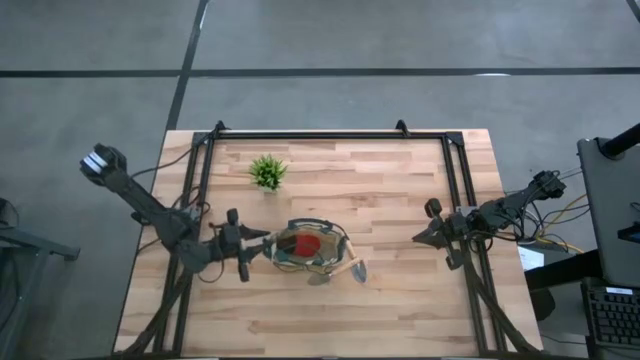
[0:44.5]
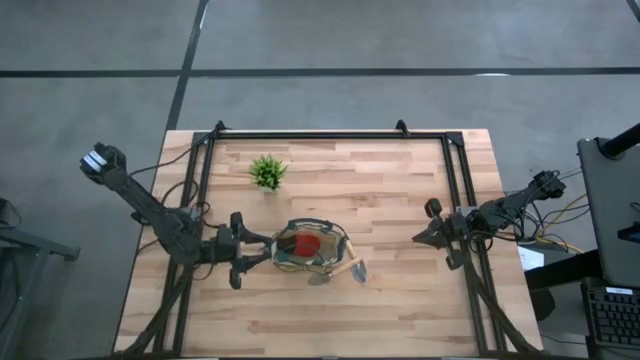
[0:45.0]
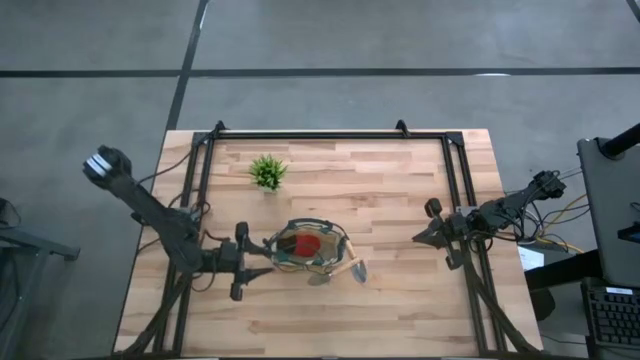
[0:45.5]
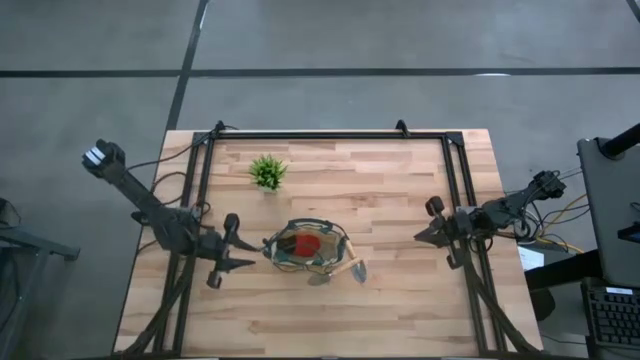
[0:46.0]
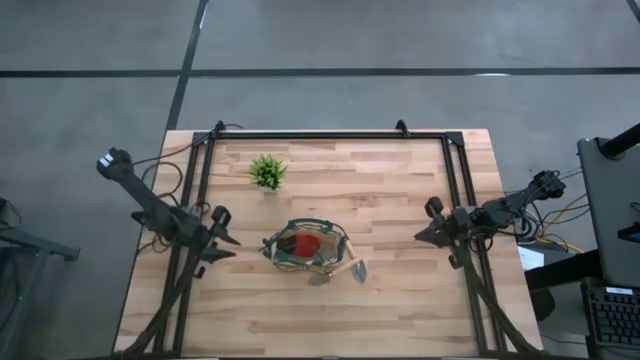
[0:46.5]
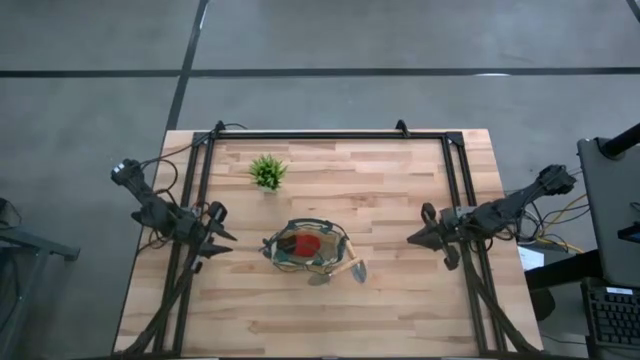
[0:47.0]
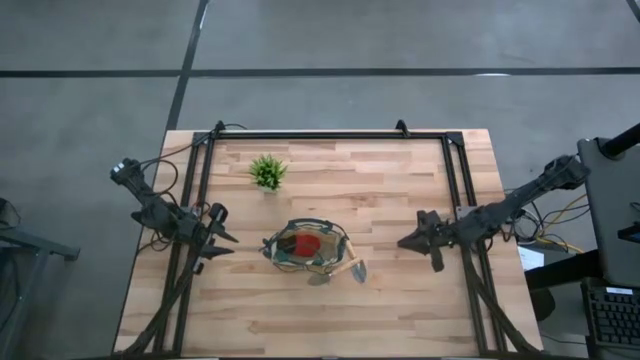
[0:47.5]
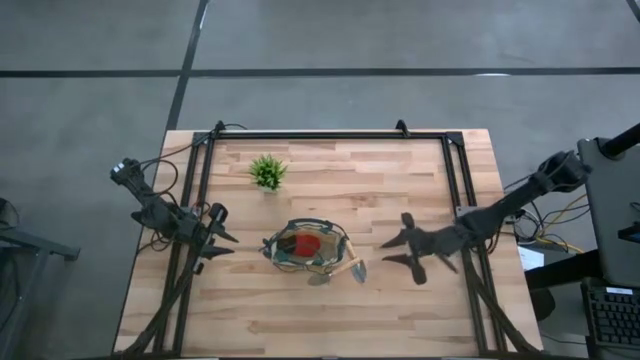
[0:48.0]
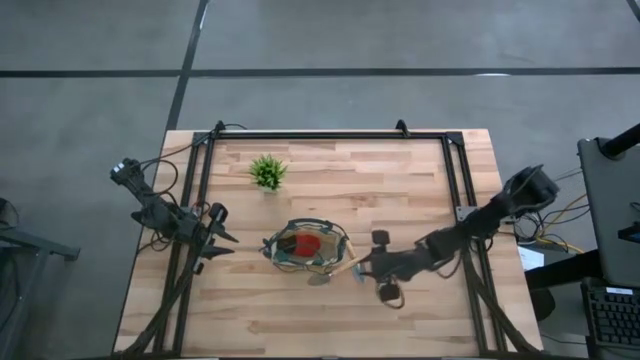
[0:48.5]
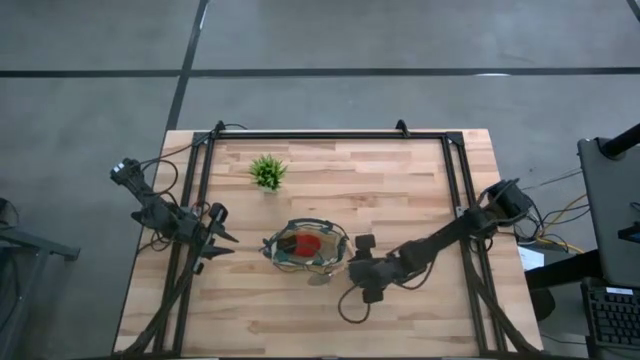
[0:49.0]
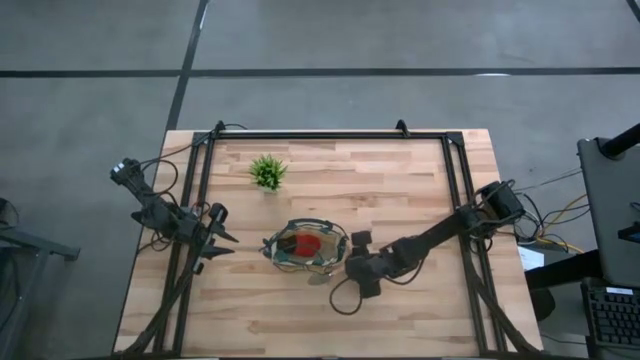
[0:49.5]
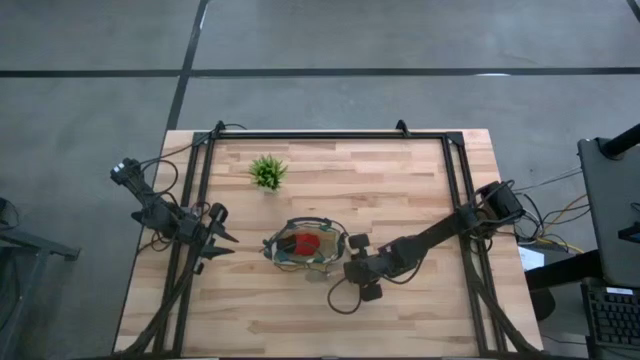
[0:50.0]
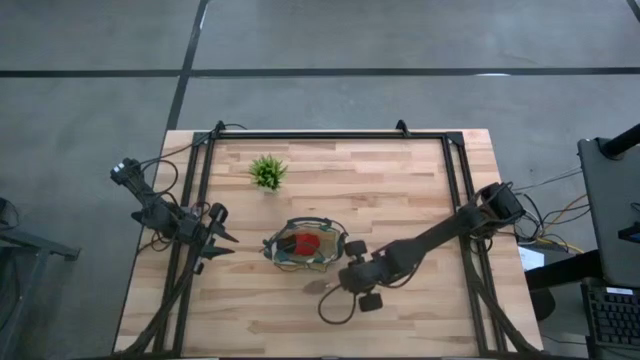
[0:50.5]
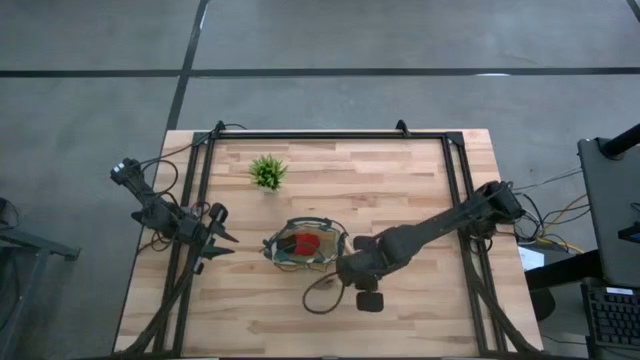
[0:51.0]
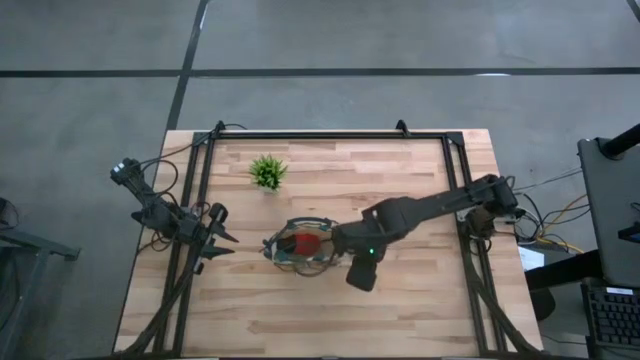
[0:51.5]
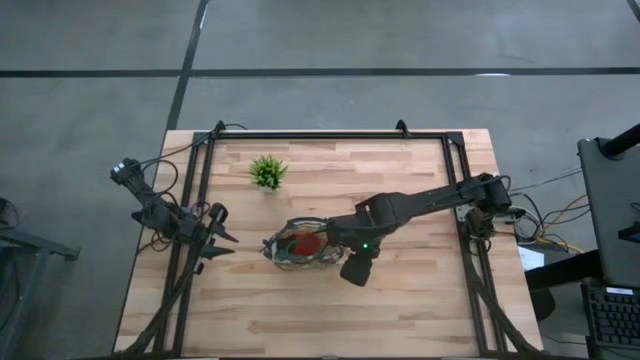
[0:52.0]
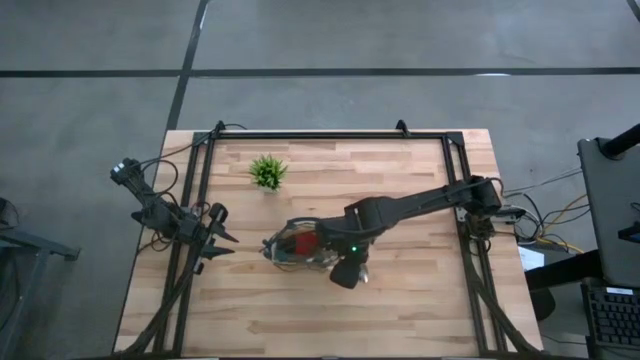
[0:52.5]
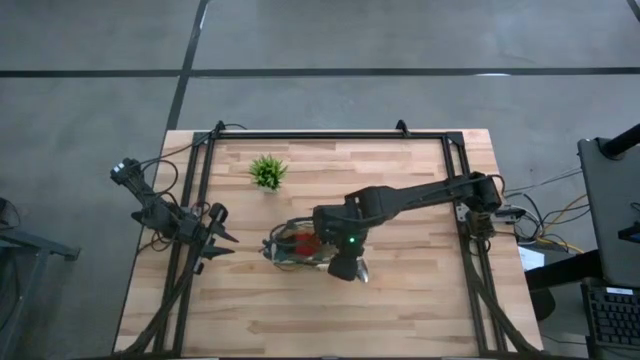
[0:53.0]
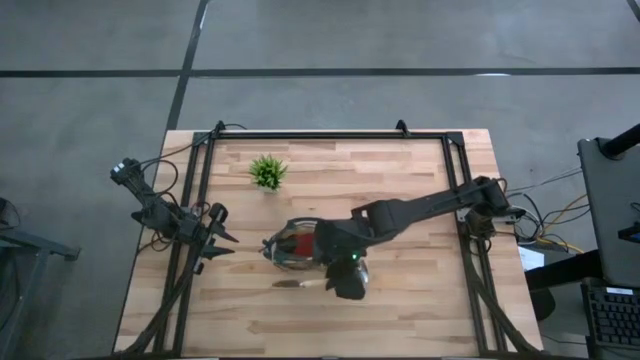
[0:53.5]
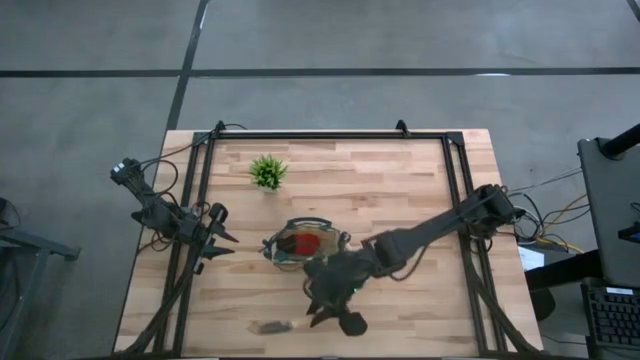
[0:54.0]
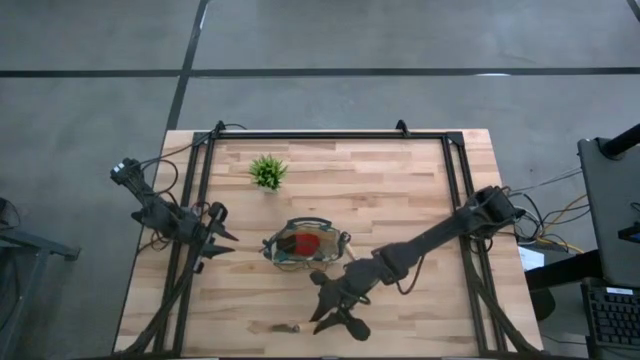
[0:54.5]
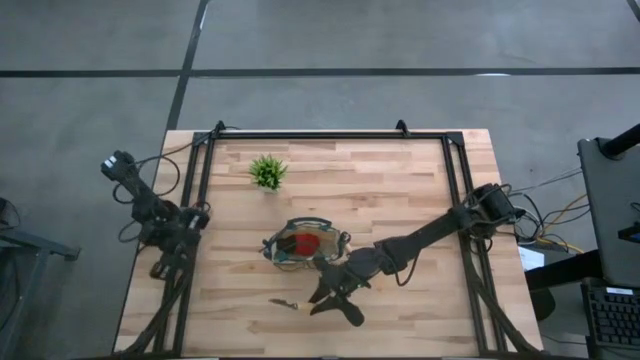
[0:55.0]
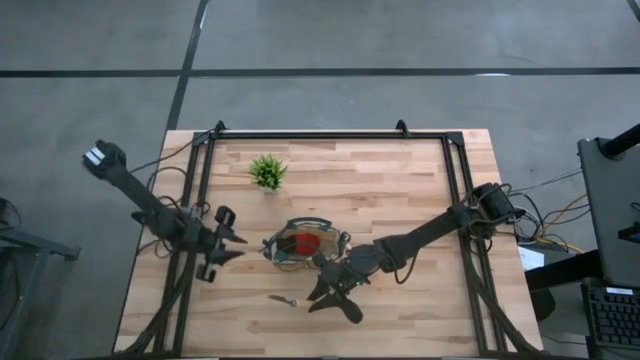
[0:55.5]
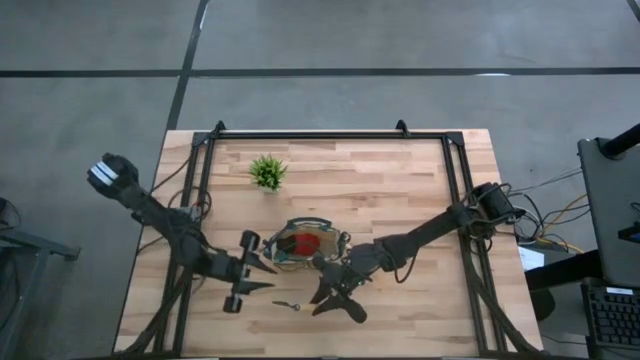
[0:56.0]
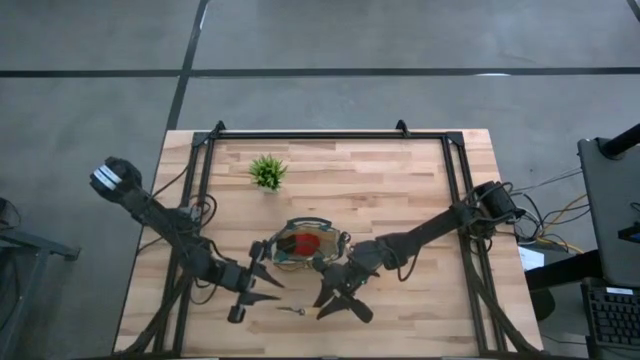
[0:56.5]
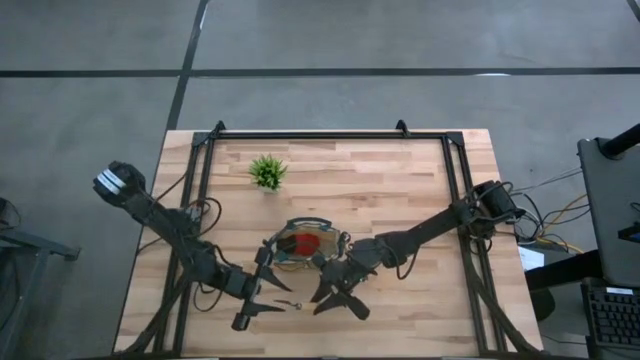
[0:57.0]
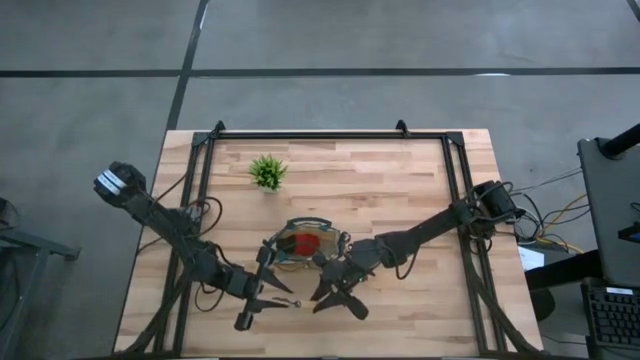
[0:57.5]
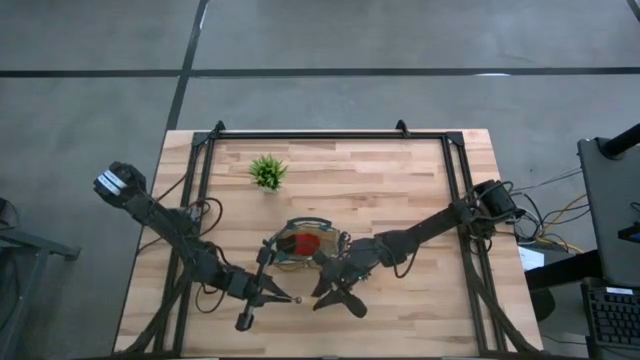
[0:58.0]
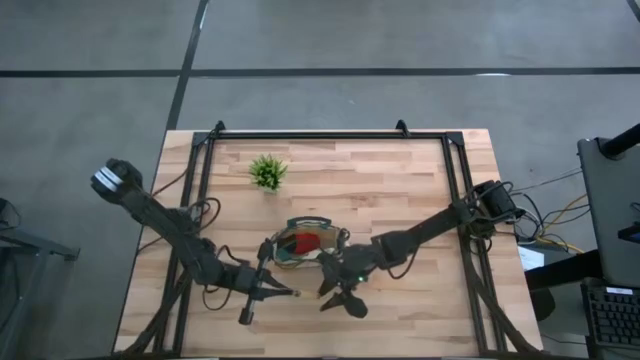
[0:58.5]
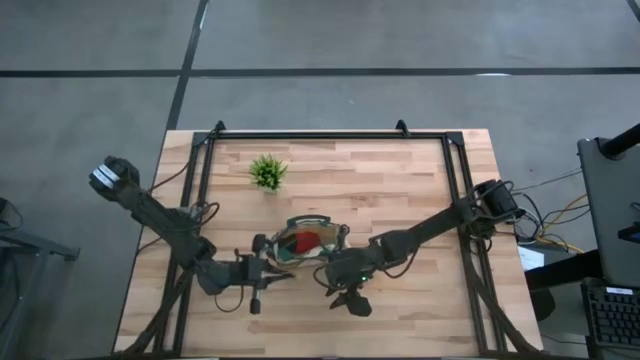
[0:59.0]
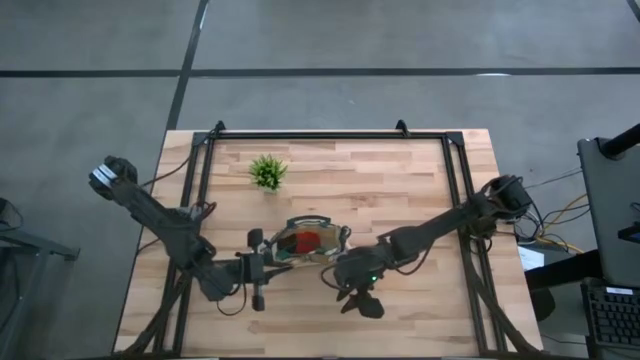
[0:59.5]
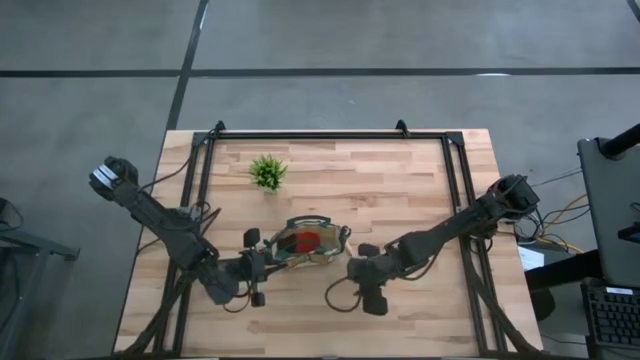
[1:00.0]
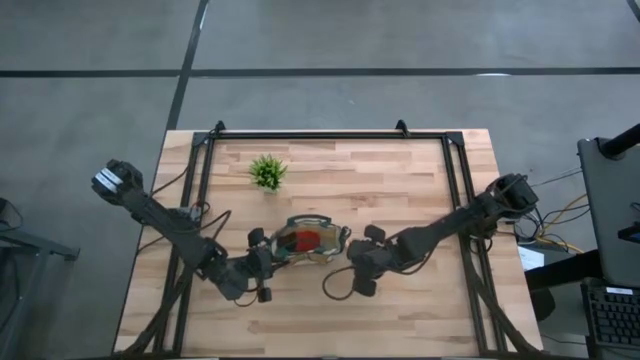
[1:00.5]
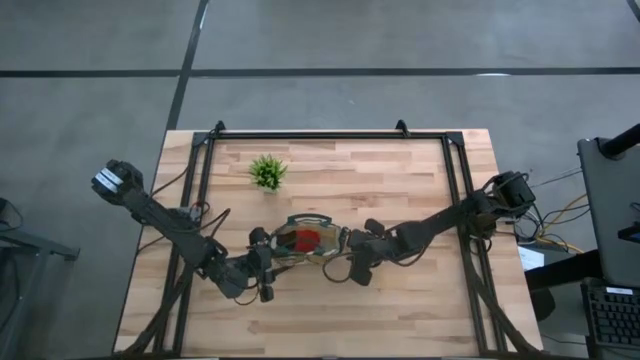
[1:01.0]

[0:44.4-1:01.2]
Task: Pick & Place Garden tools in Gardening bag
Put the left brown trowel into the gardening bag

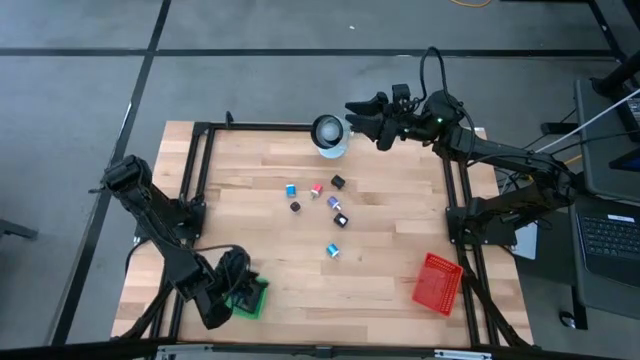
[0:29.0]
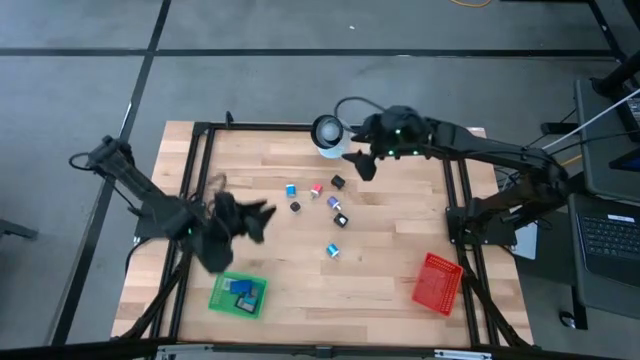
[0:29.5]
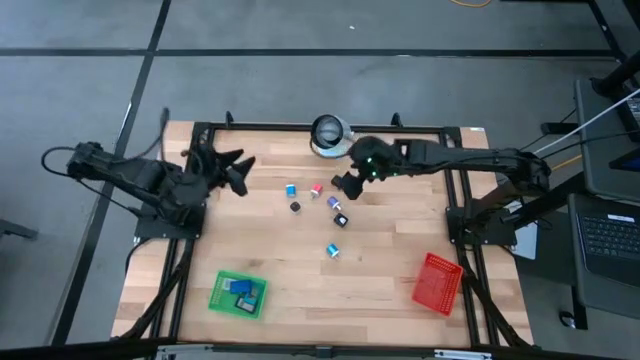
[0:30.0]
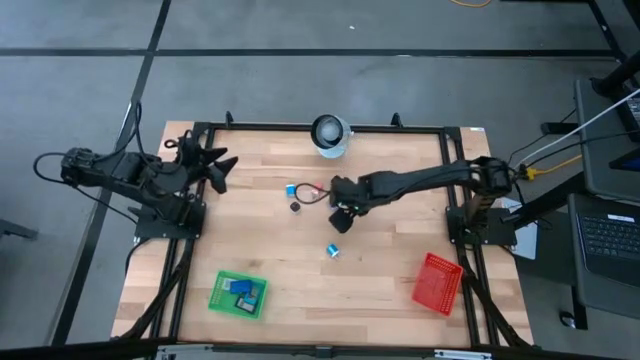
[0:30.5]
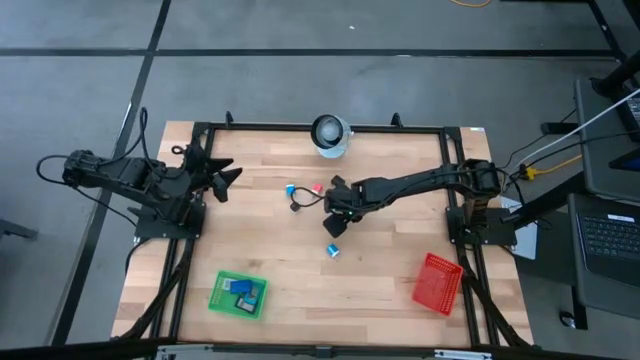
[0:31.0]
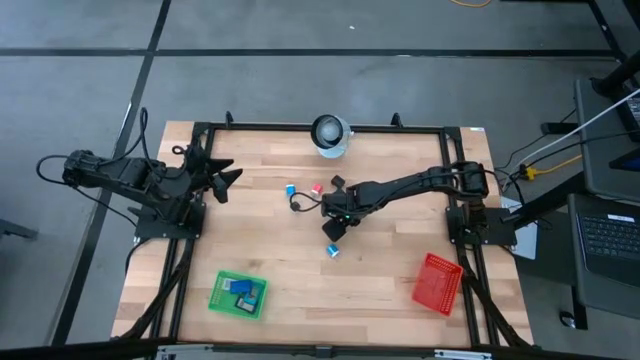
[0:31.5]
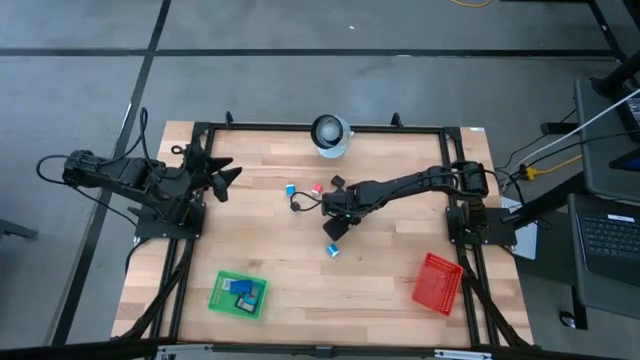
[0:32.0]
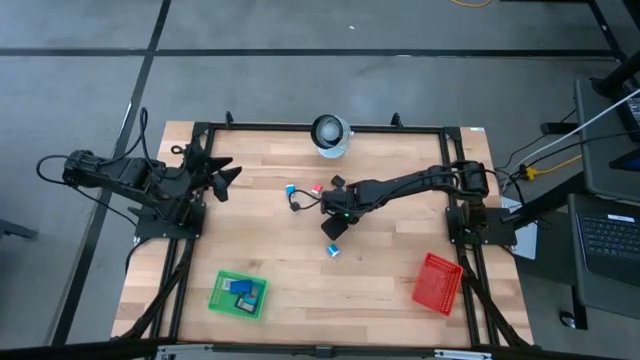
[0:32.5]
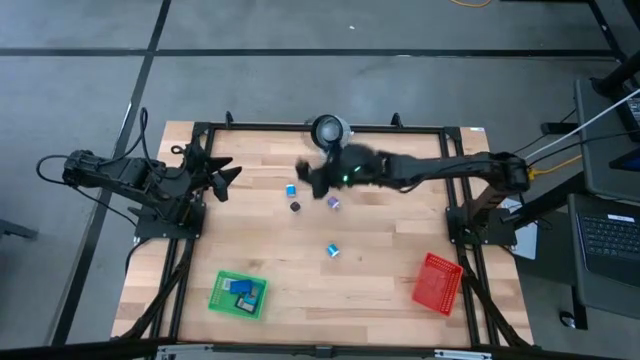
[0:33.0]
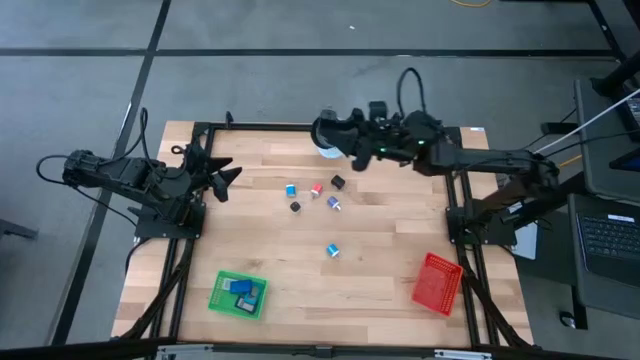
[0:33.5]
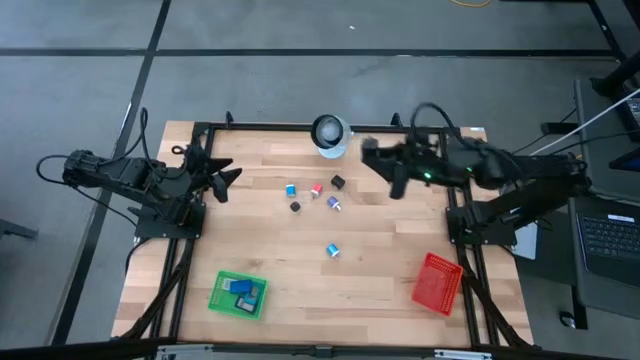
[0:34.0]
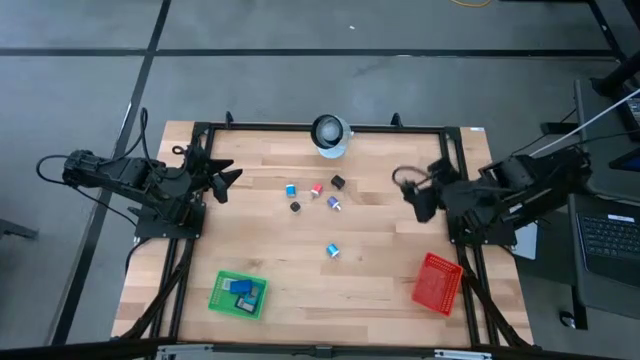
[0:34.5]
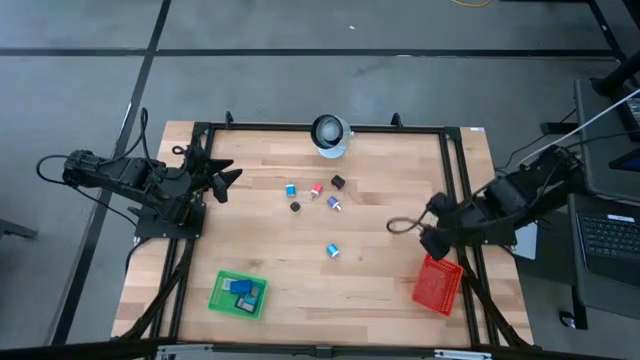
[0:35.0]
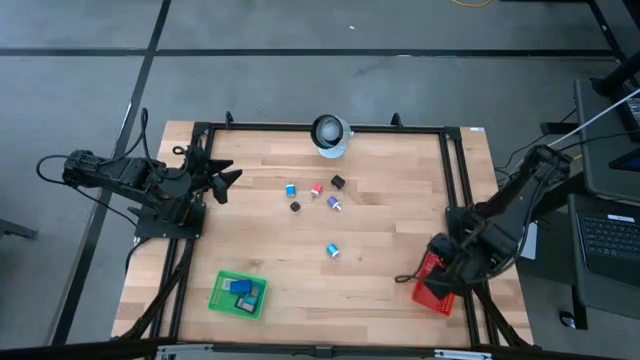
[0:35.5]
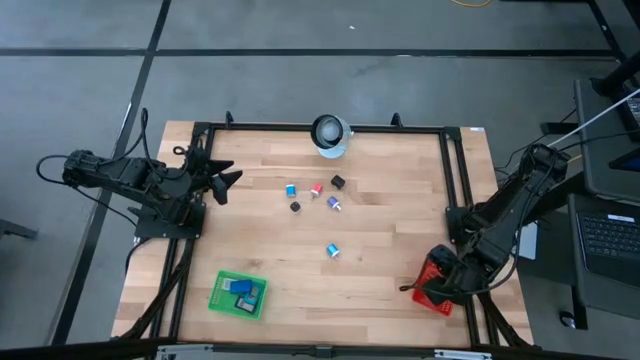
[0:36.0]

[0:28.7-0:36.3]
Task: Pick & Place Office items
Put the bottom black charger adapter into the red bin
